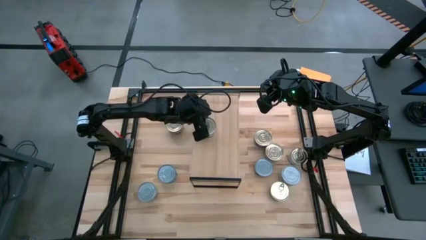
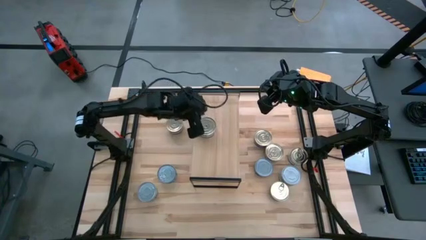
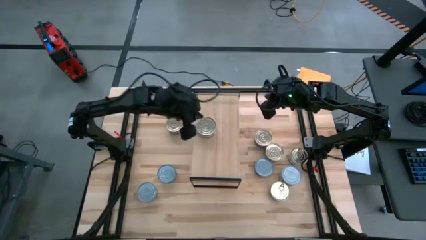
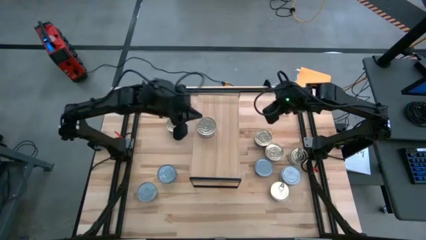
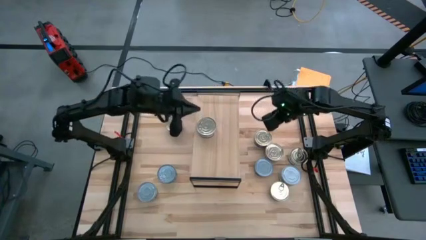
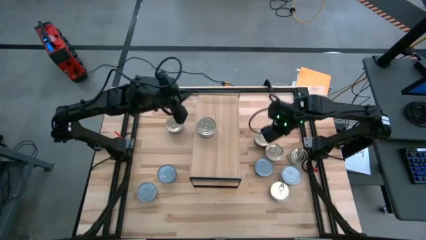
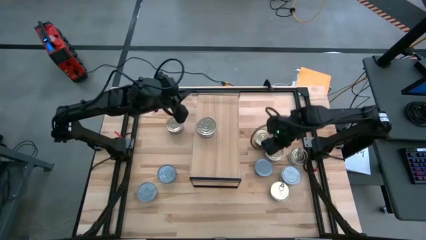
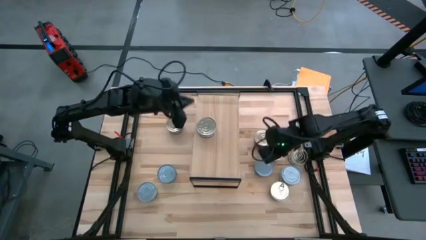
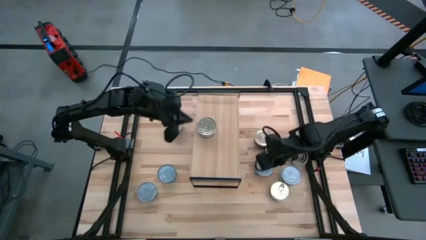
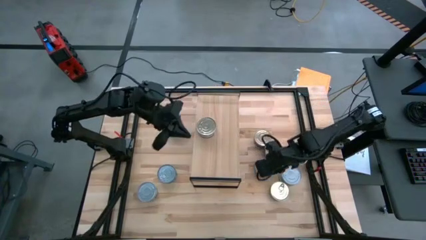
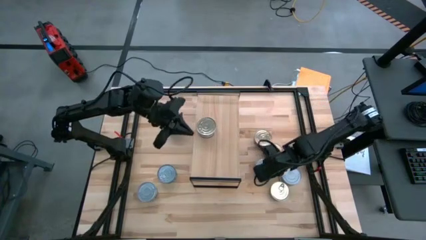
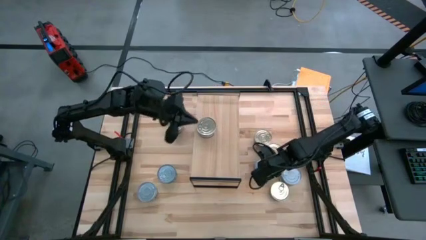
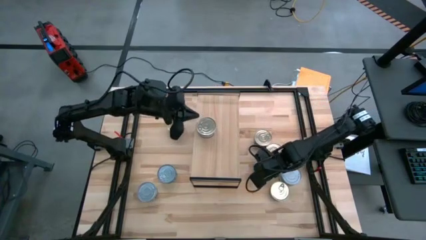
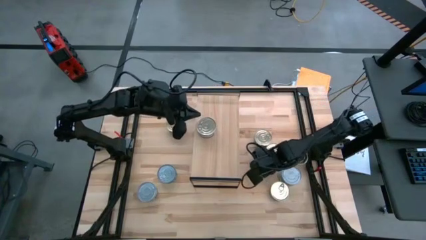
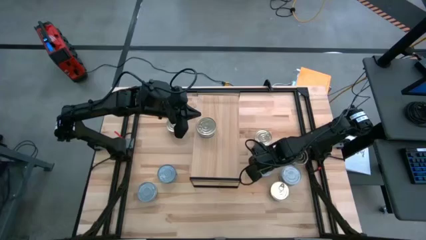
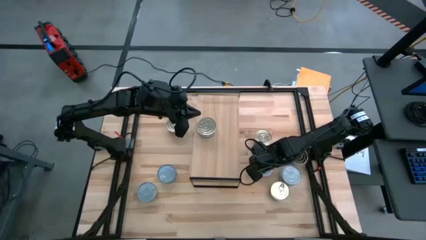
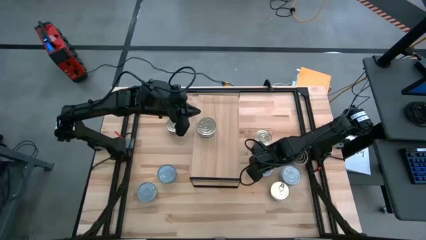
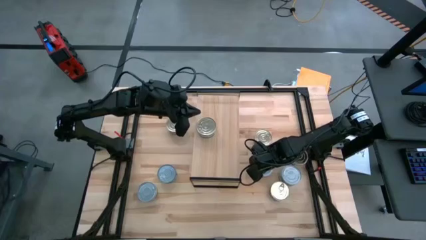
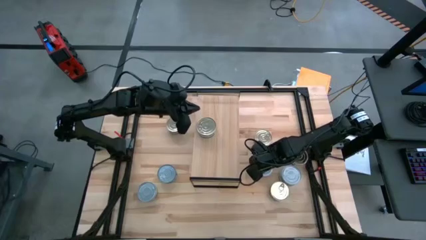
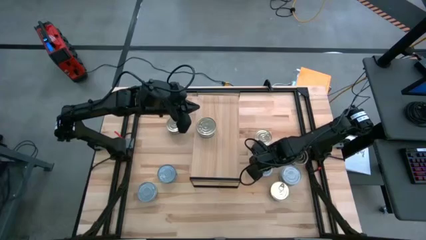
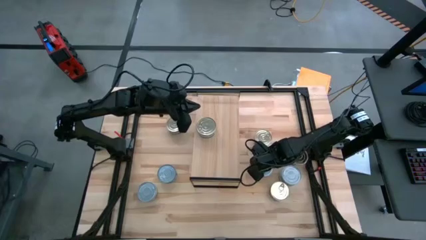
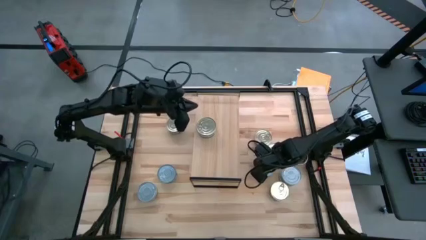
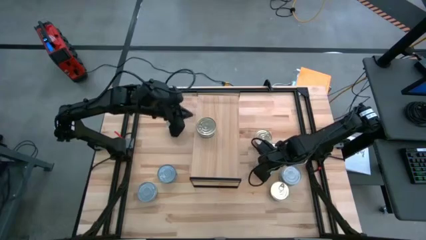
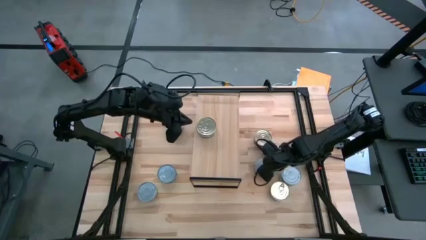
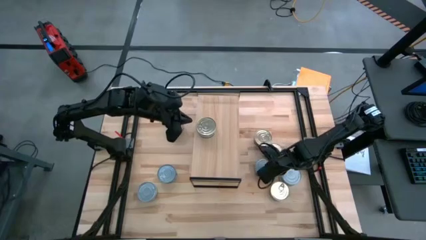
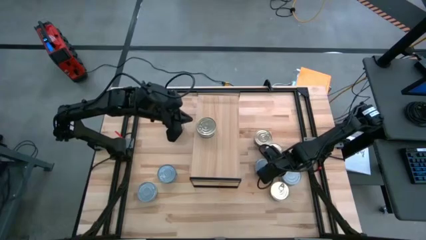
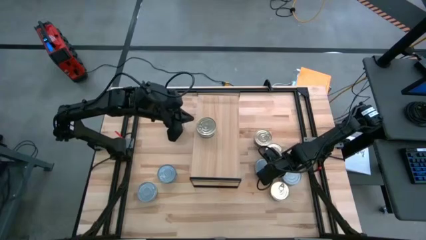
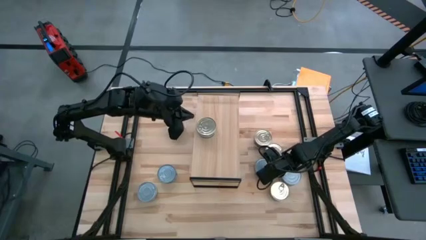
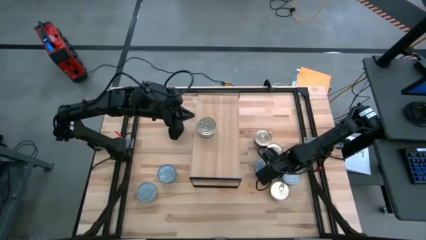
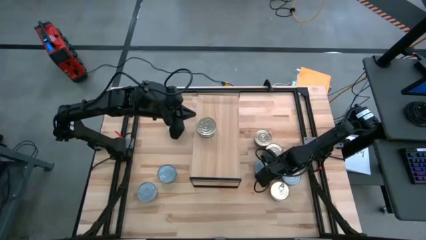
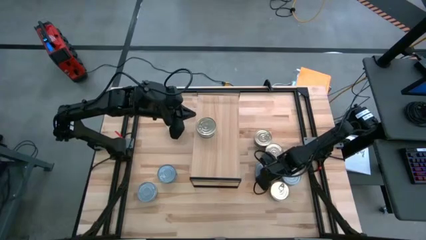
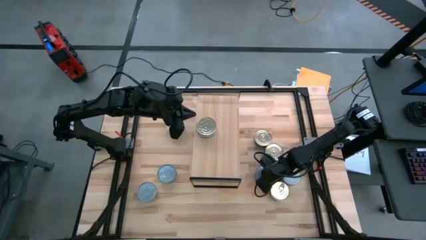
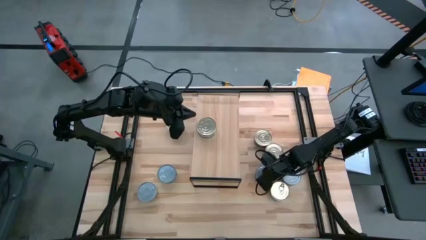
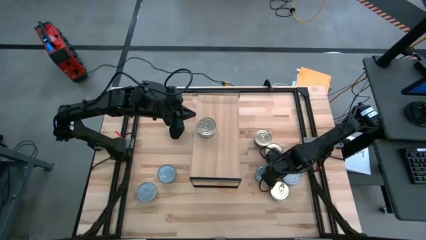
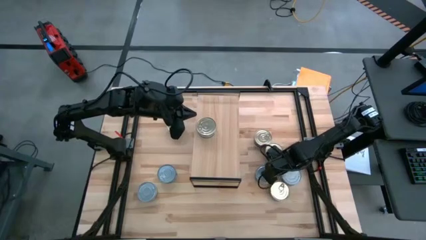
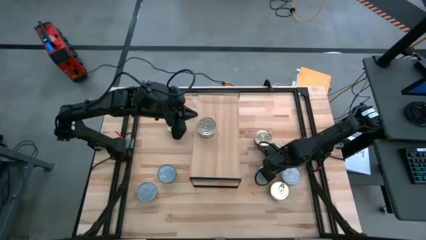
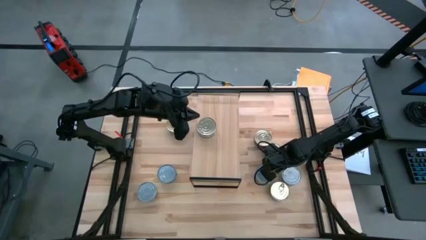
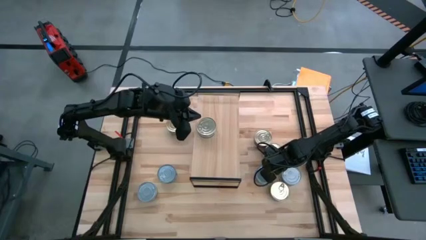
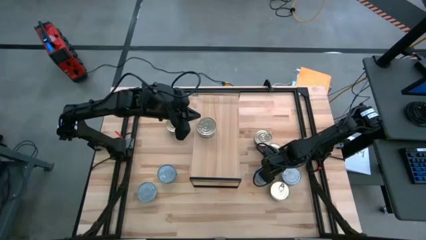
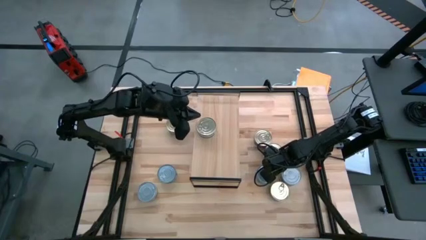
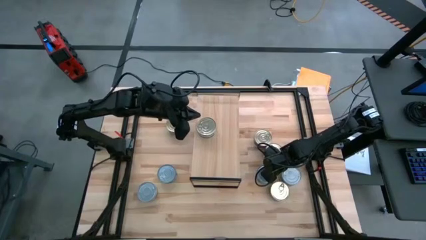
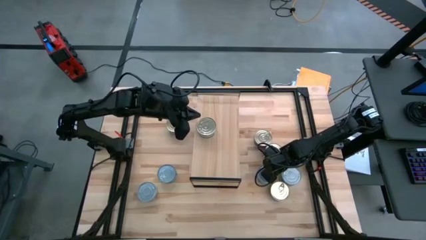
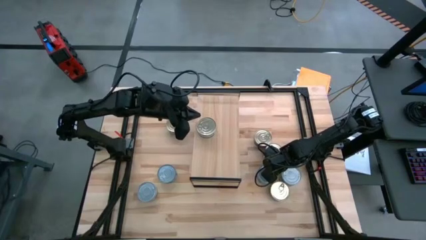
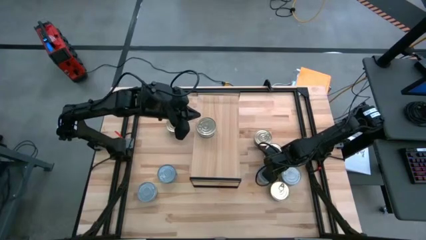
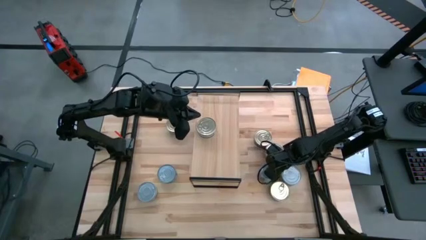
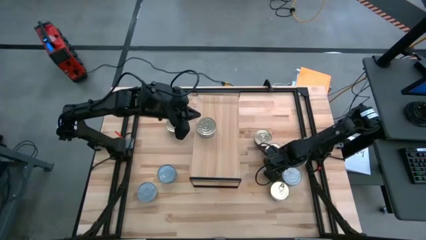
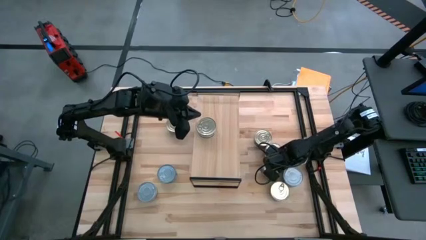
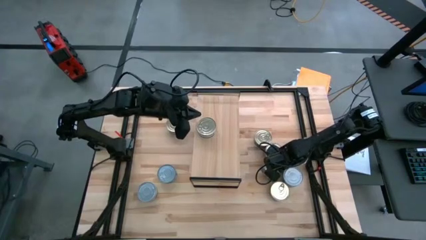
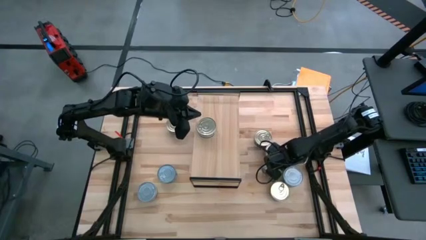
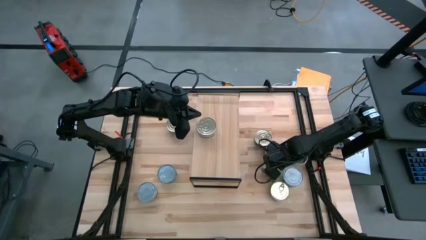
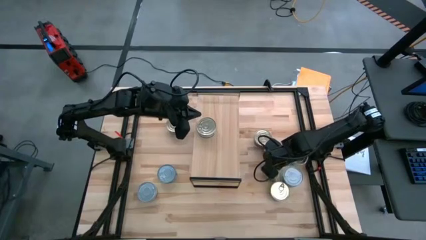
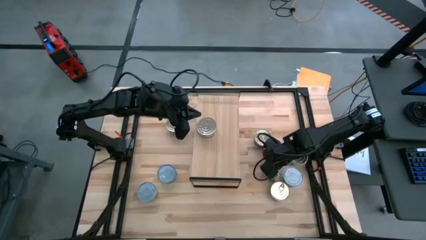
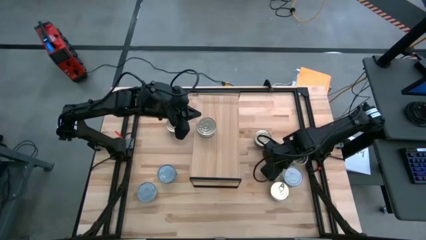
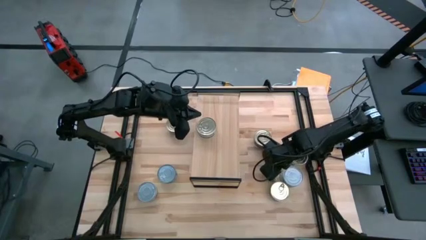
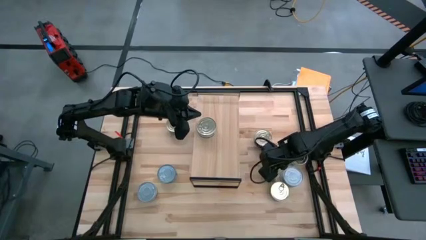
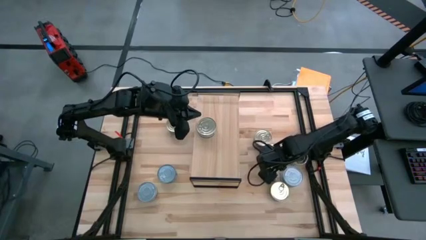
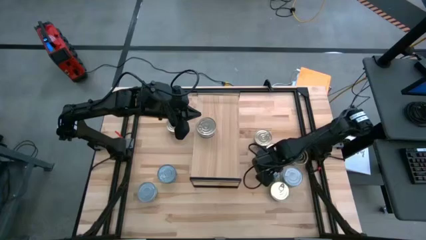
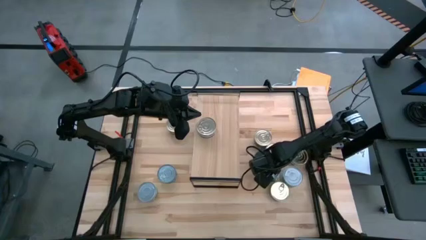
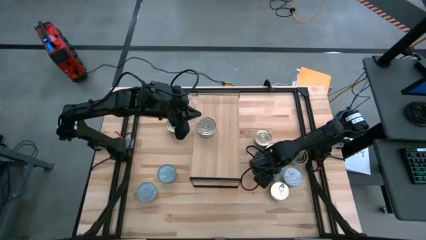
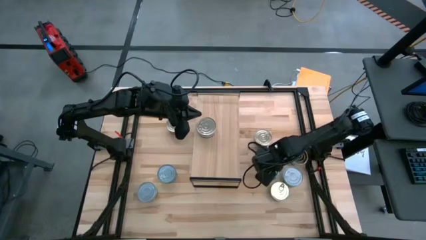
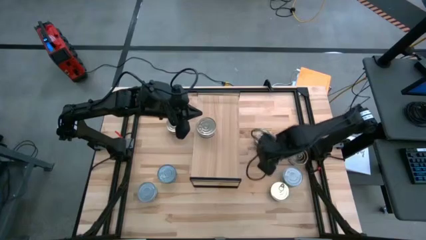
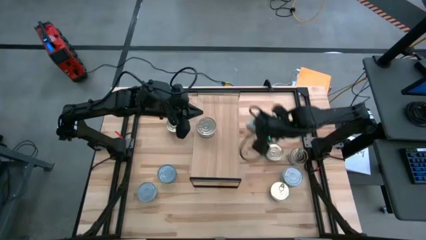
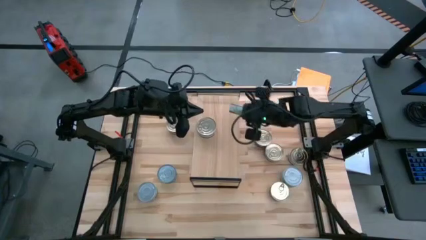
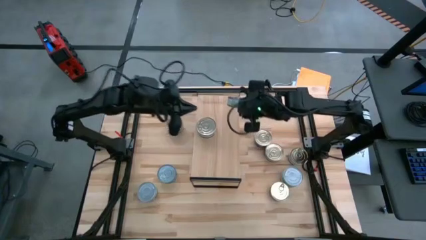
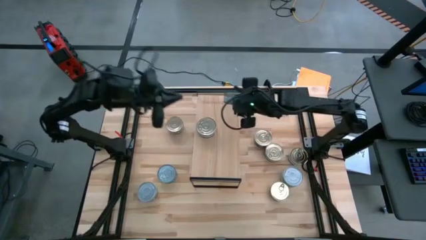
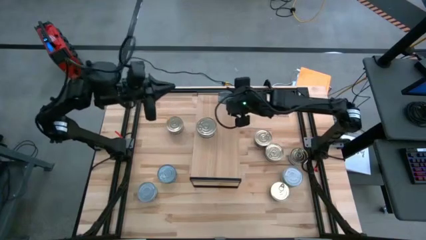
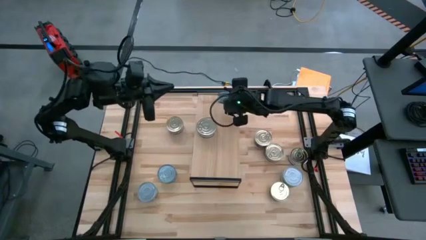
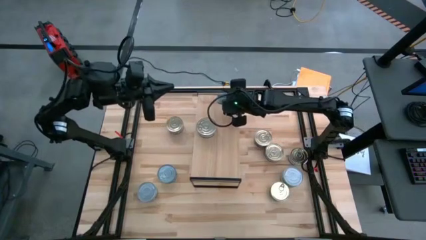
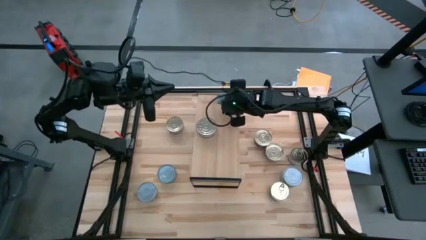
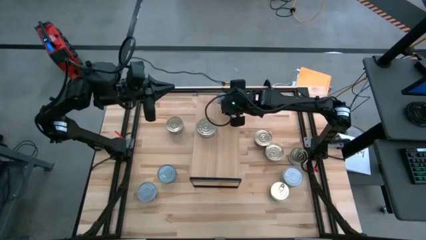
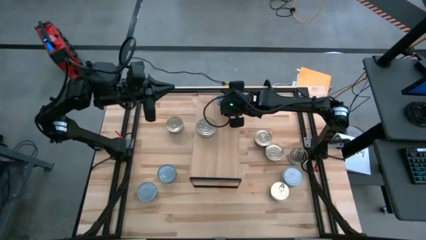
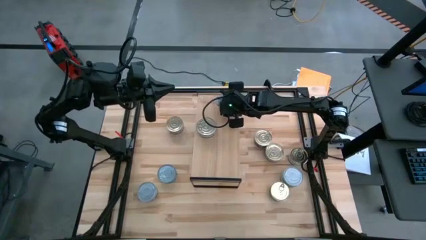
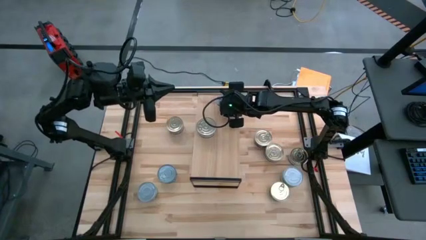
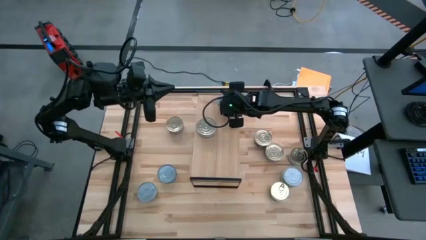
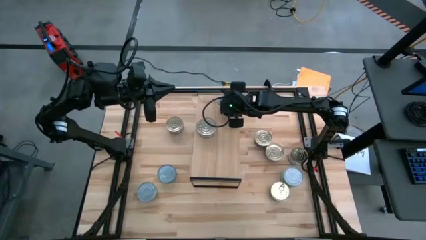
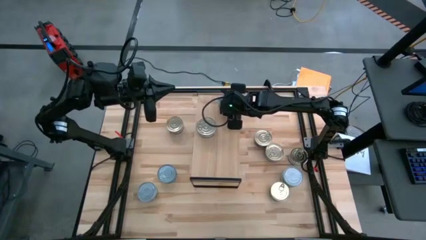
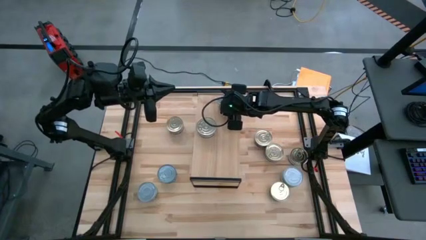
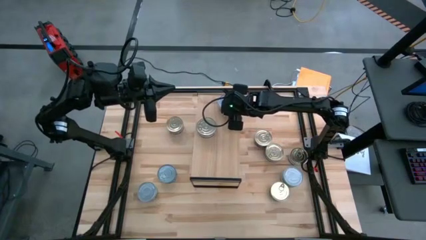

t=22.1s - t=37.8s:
Task: Stack canned seafood by type on shelf
Put the green tuna can on the shelf
